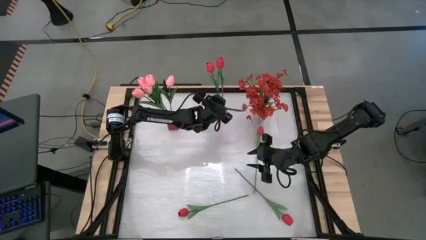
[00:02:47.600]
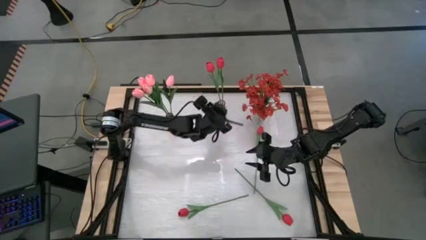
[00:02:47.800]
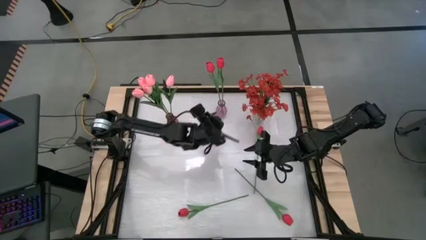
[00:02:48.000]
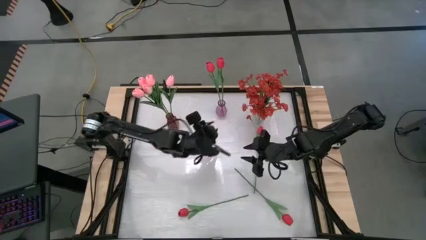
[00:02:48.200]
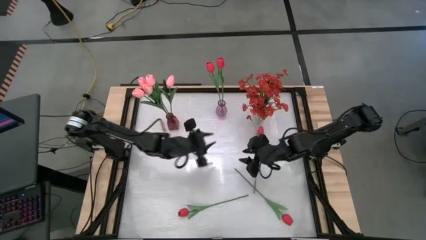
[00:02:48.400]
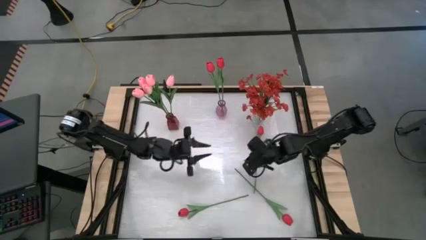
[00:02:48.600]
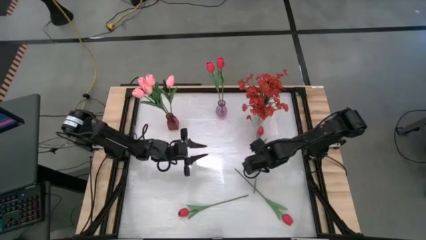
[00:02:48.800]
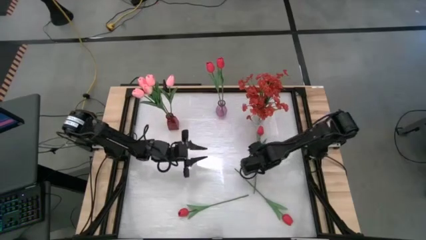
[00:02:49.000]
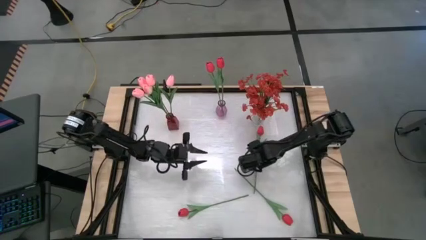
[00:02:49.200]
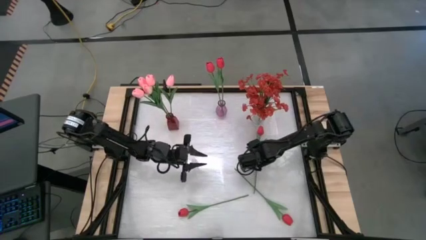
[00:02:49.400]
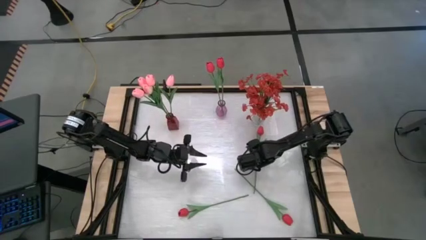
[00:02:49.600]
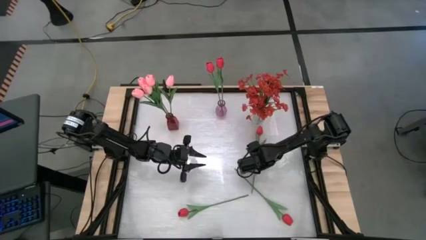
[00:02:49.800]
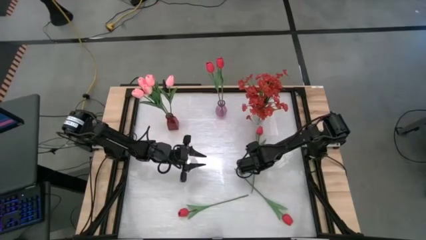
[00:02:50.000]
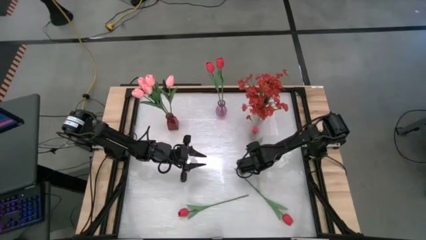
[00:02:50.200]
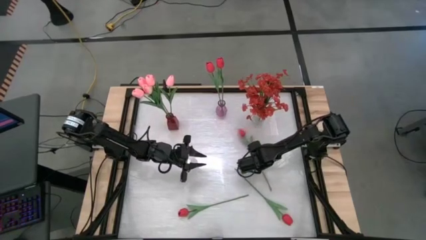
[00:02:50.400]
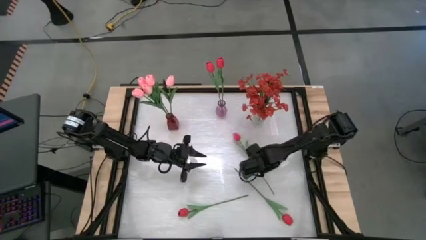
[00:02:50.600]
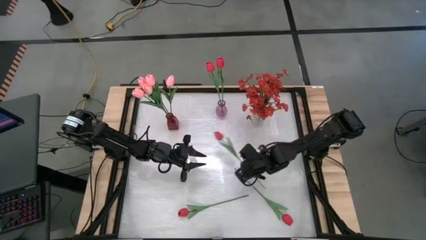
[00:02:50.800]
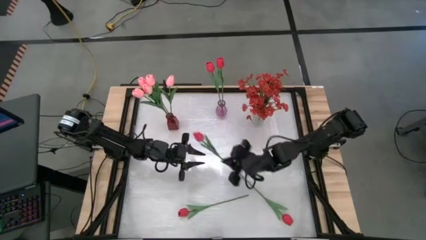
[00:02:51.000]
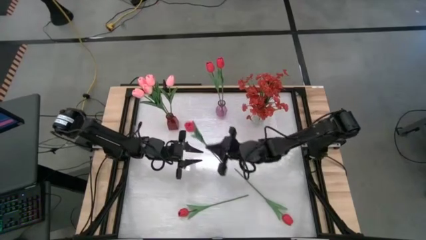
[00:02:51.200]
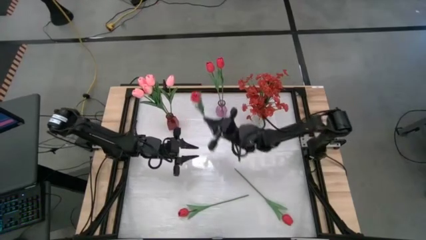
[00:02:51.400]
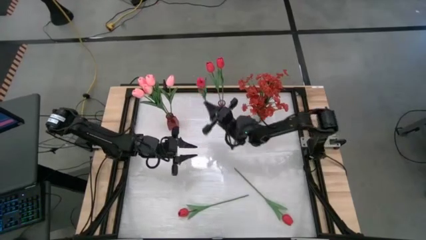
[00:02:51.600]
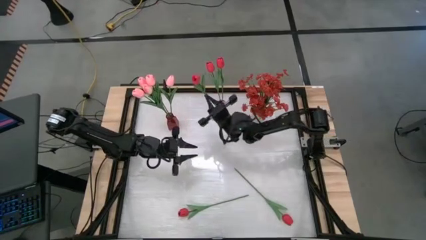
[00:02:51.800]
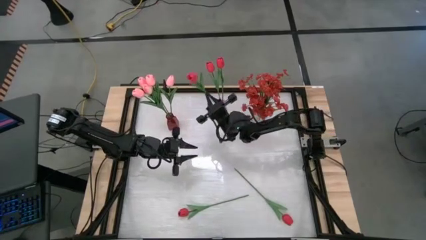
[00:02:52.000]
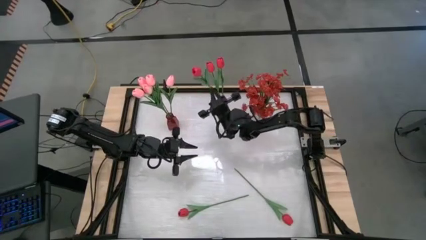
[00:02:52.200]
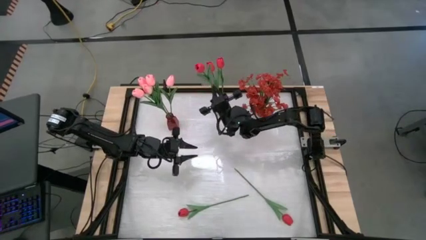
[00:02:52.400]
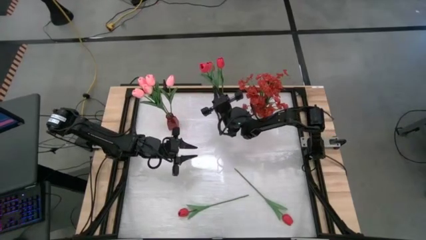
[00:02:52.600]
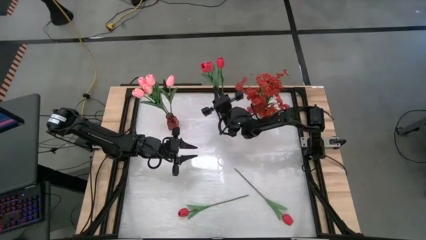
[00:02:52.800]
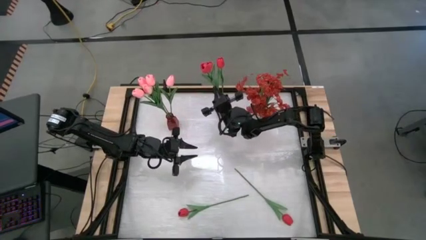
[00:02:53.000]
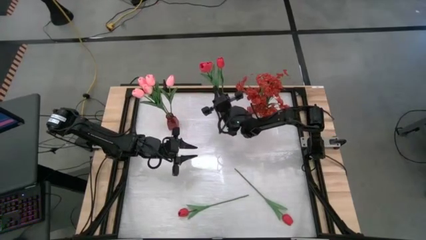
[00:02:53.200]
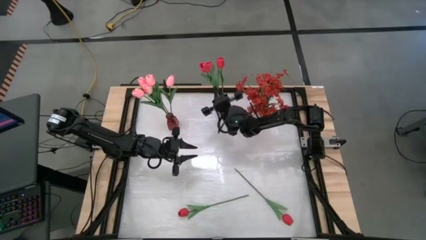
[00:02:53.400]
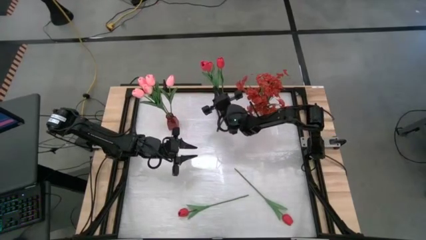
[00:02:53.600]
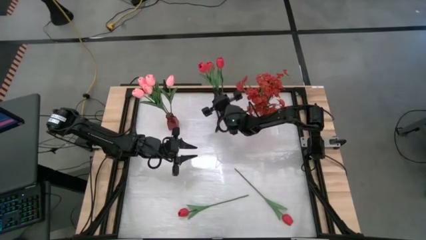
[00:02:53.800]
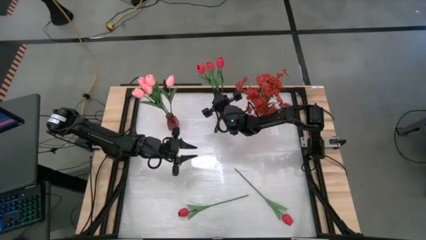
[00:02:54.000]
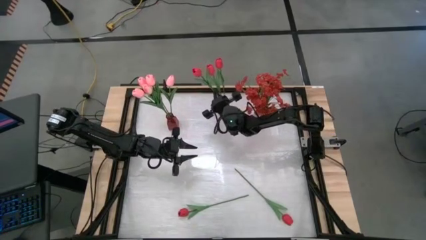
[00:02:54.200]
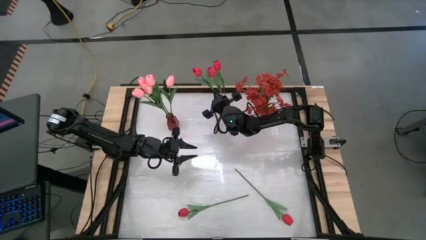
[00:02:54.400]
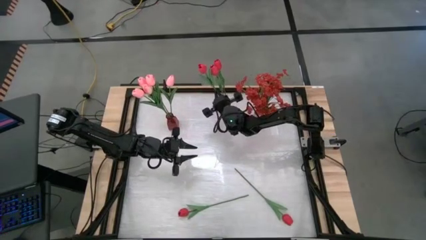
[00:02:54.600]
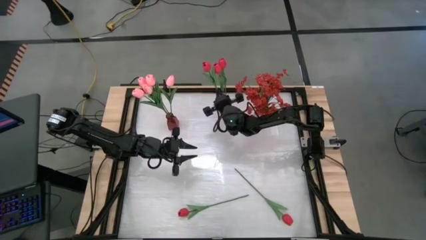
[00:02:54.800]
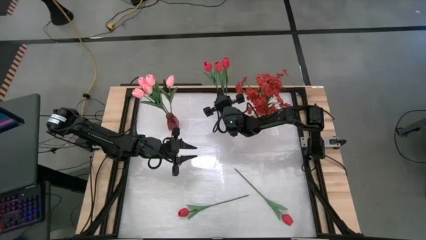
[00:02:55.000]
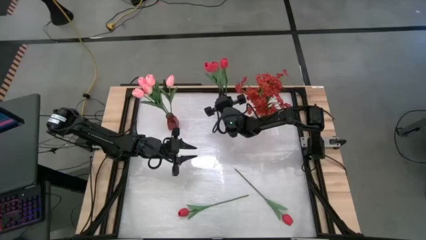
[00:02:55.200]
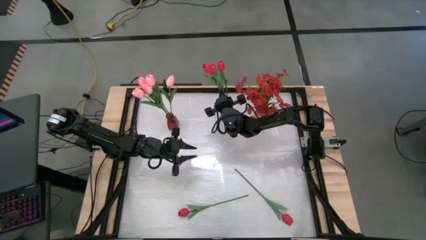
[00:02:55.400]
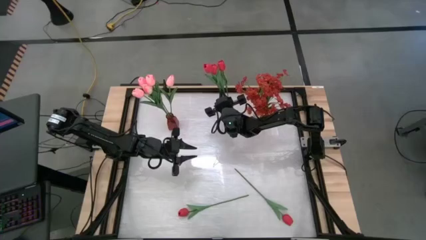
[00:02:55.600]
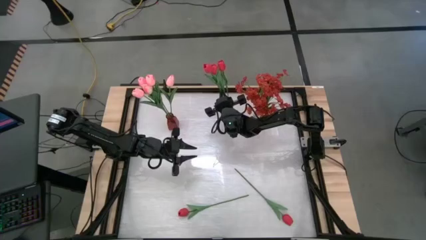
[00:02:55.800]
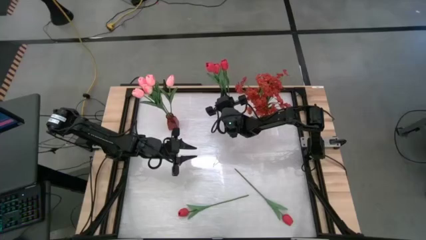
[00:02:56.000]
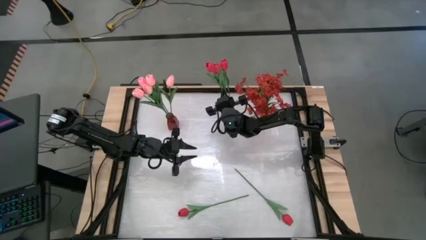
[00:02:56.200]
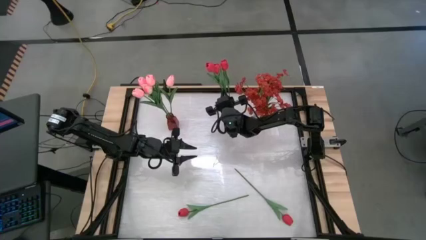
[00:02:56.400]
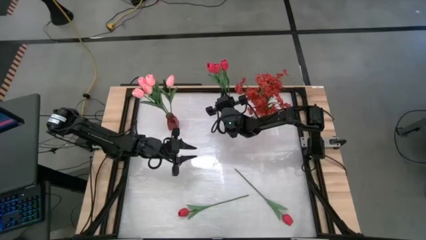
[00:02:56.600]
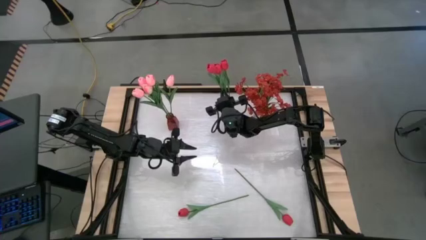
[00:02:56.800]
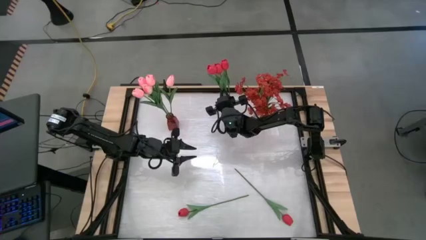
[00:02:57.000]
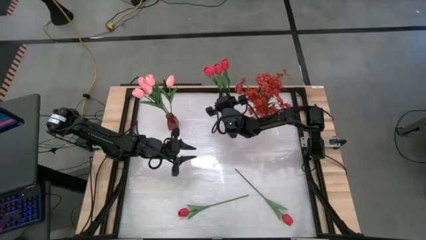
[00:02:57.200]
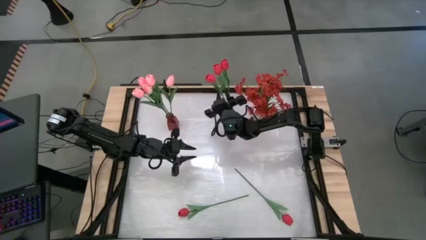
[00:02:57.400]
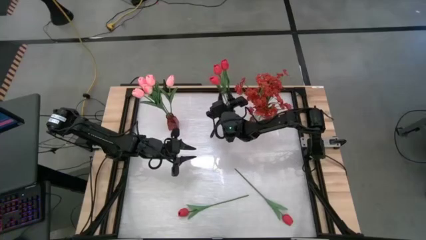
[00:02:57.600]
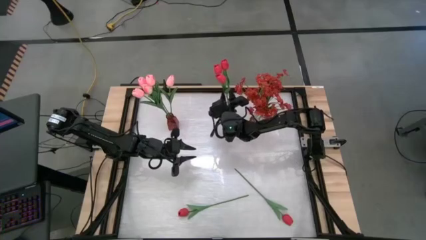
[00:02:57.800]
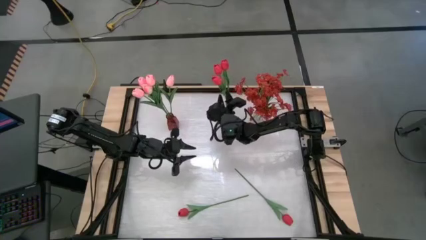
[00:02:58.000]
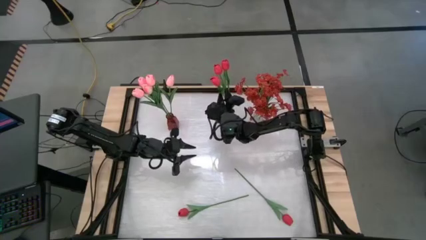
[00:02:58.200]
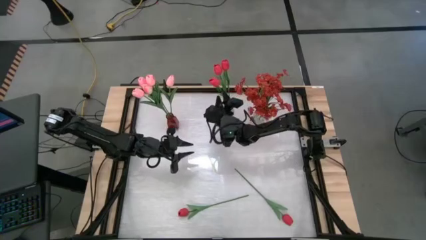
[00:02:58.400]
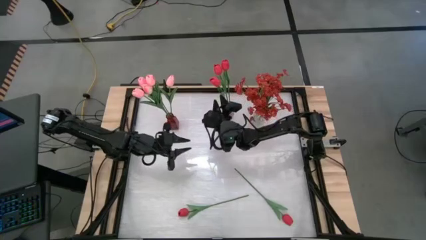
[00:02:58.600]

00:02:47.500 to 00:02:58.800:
Task: Sort flowers into vase by color
Put the red tulip into the purple vase

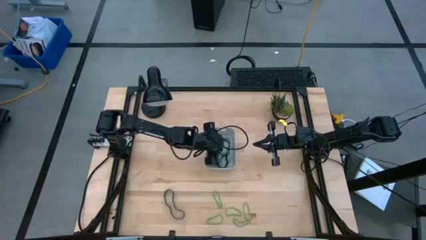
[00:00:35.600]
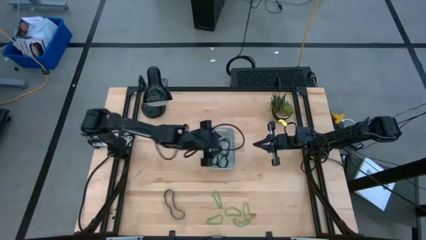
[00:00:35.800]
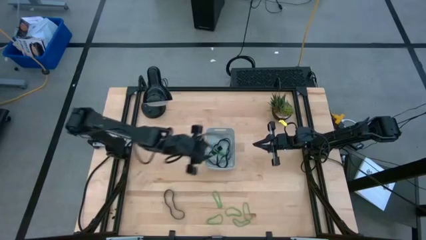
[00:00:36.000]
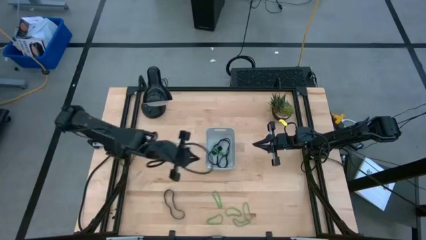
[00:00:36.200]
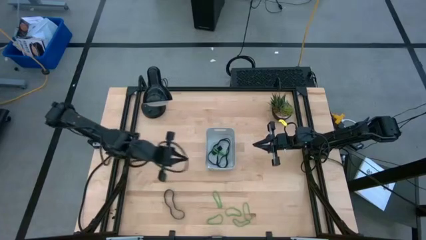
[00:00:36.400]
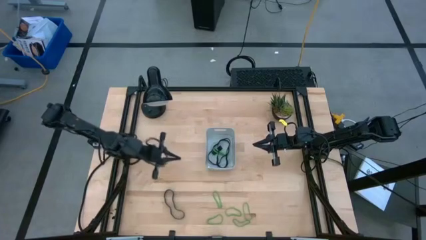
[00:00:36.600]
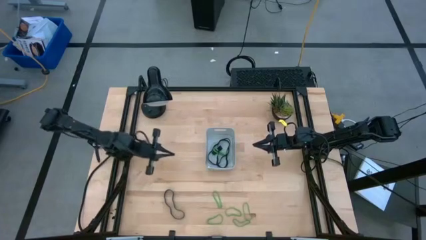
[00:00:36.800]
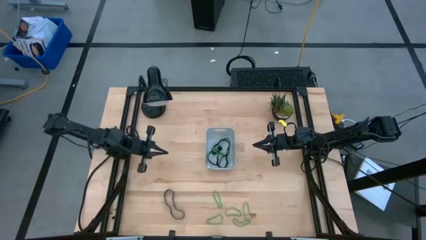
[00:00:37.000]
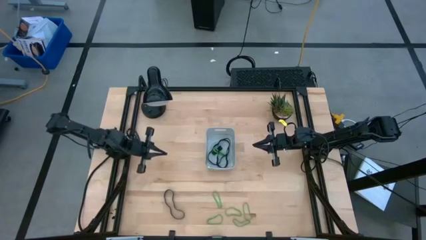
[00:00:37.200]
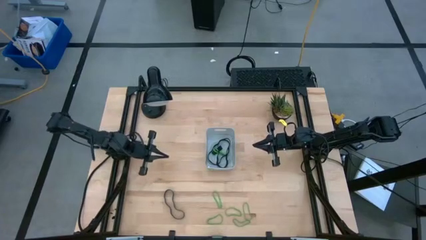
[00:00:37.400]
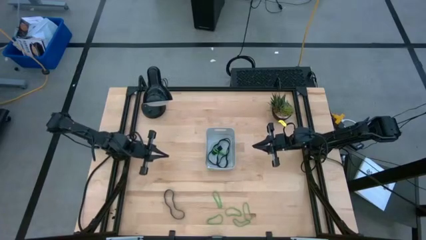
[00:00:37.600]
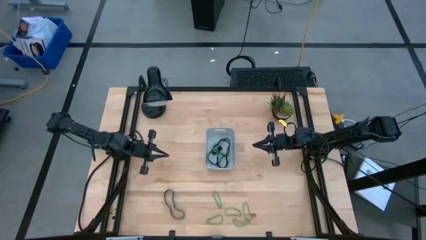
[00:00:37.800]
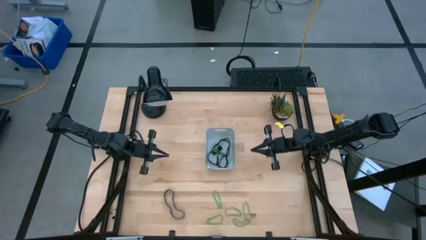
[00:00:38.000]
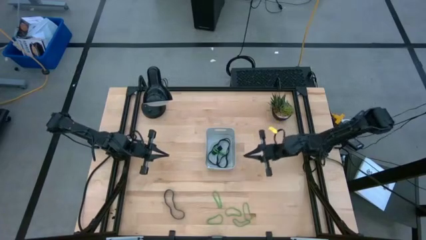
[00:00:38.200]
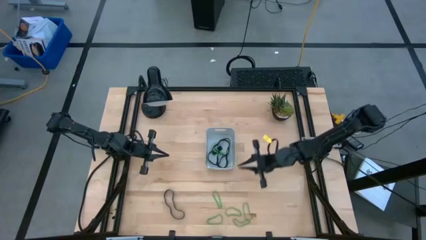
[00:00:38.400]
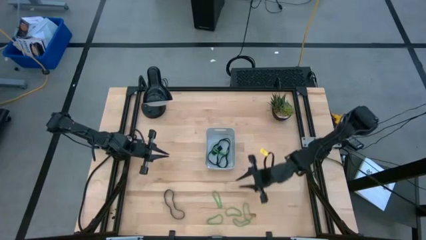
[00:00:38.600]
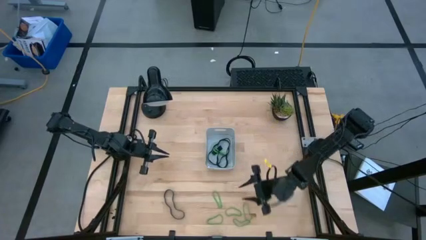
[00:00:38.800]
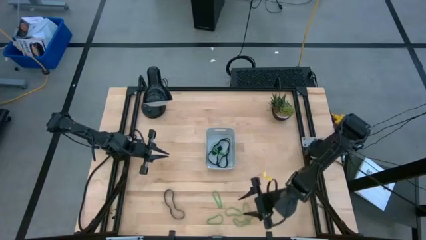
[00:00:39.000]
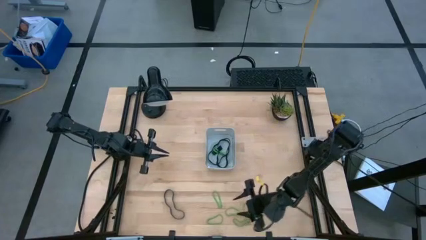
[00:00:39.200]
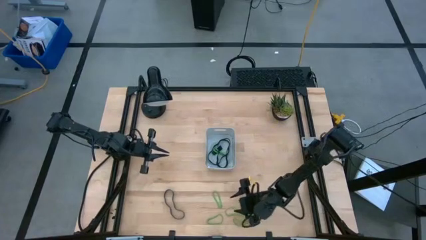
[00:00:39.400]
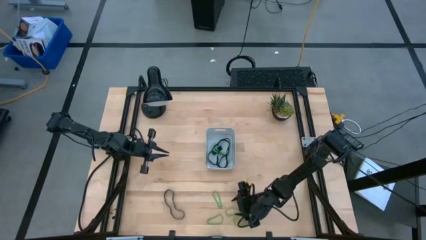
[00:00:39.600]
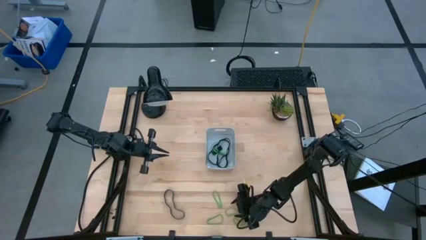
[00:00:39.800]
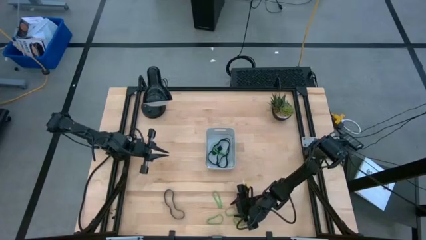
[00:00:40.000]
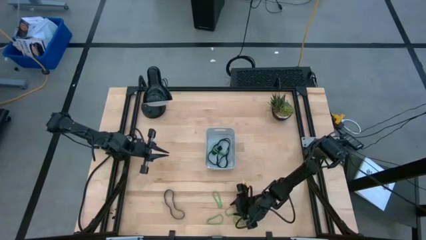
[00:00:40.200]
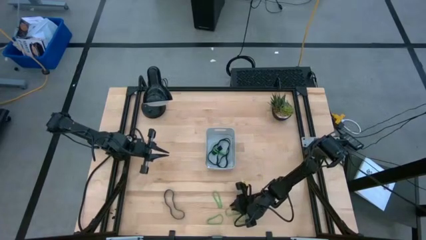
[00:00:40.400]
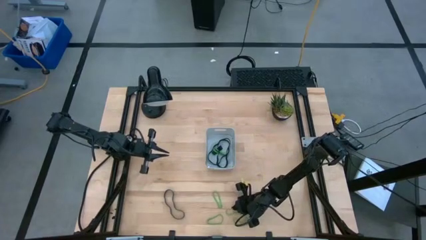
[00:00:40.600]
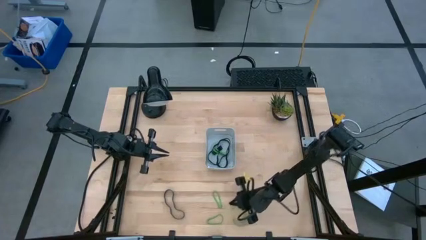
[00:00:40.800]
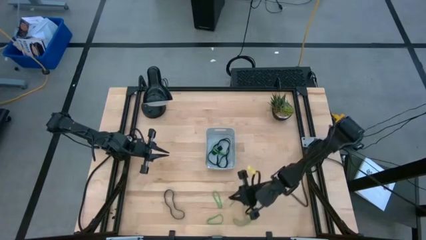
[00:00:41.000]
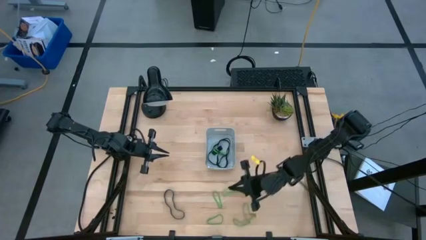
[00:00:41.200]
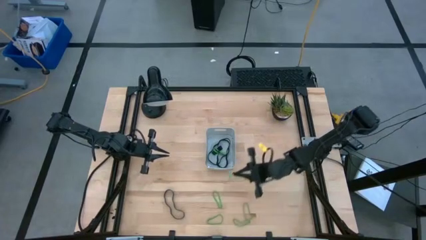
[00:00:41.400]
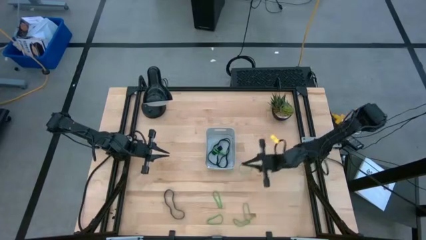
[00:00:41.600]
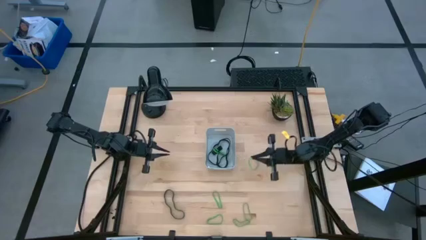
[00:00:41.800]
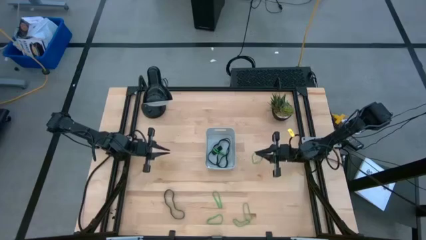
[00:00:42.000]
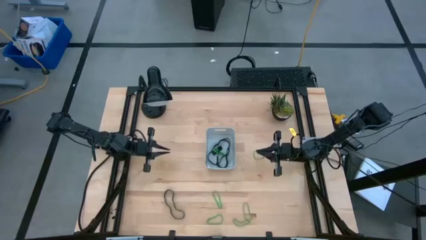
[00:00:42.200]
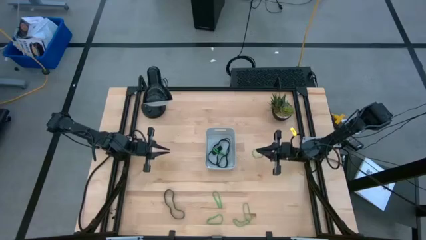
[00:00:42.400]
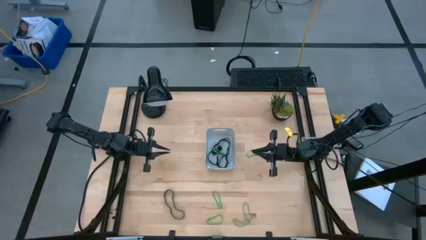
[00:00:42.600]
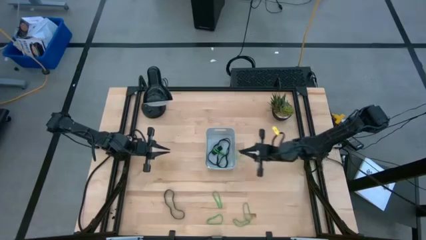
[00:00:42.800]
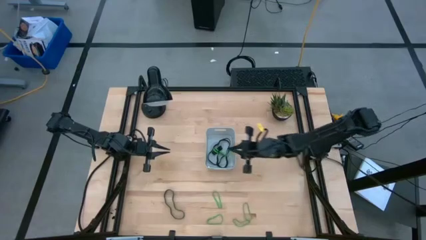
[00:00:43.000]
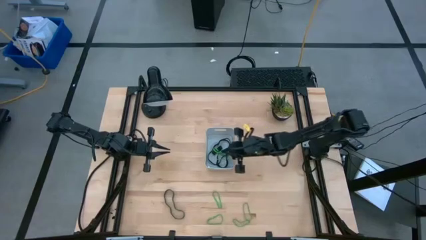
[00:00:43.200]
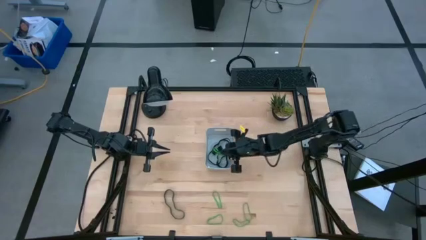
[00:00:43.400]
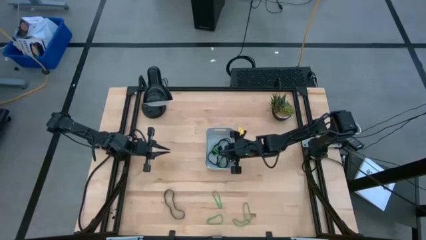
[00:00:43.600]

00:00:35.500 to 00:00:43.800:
Task: Pick and place rubber bands into bin
Put the green rubber band into the gray bin
